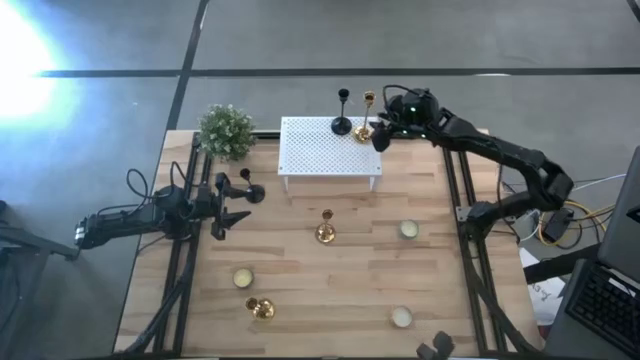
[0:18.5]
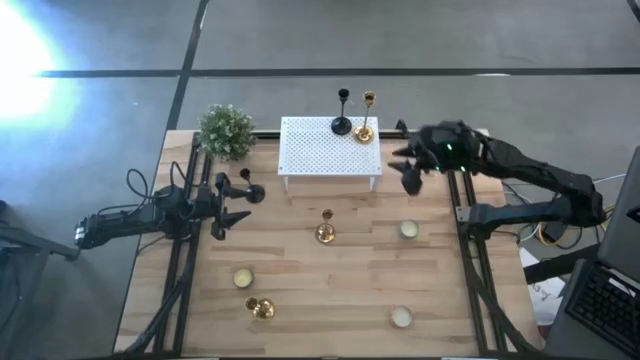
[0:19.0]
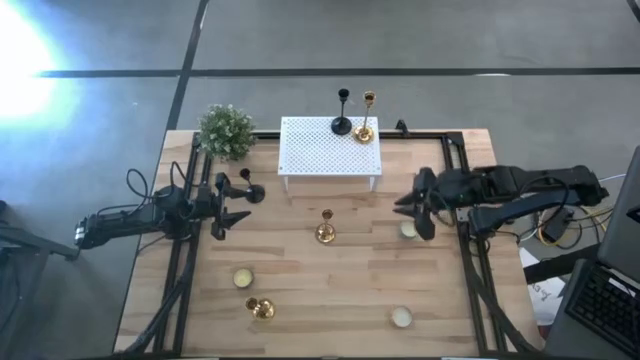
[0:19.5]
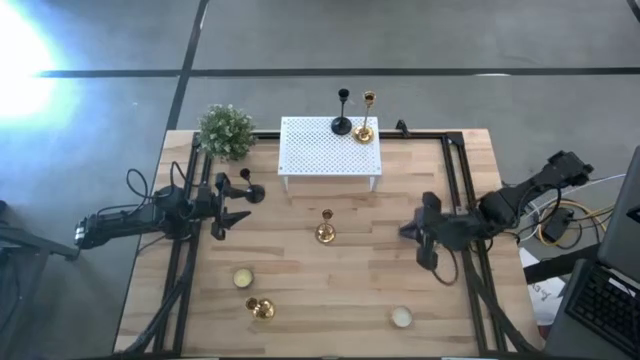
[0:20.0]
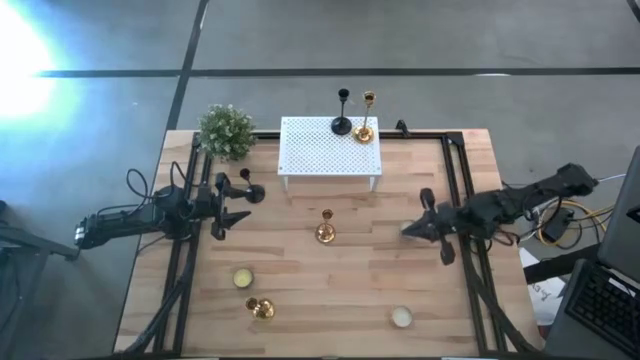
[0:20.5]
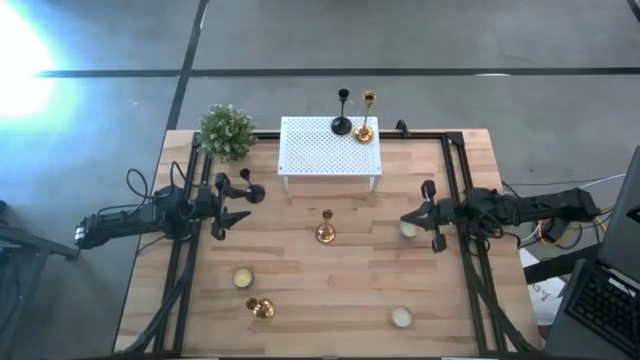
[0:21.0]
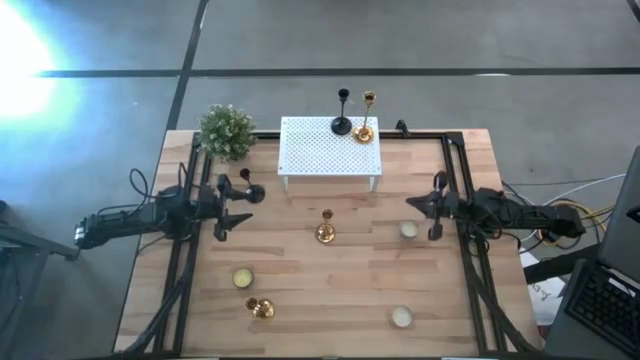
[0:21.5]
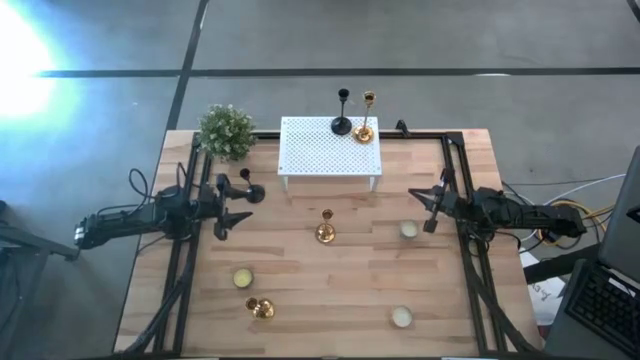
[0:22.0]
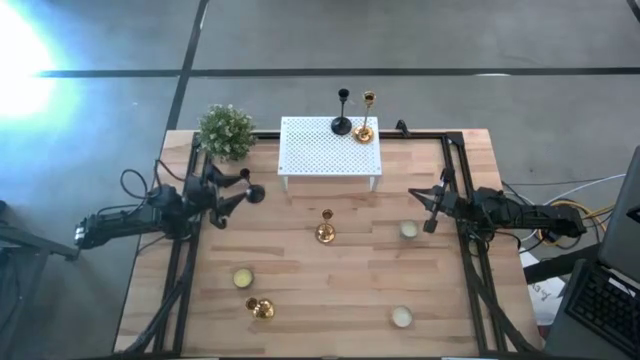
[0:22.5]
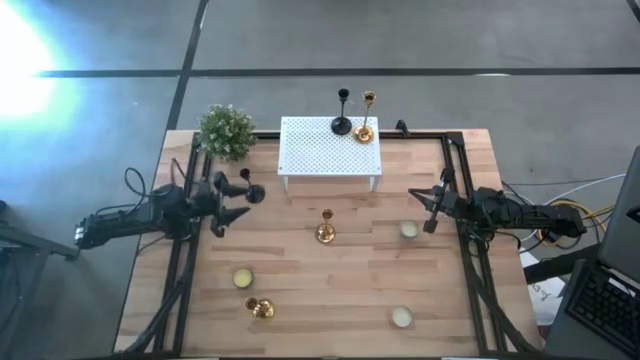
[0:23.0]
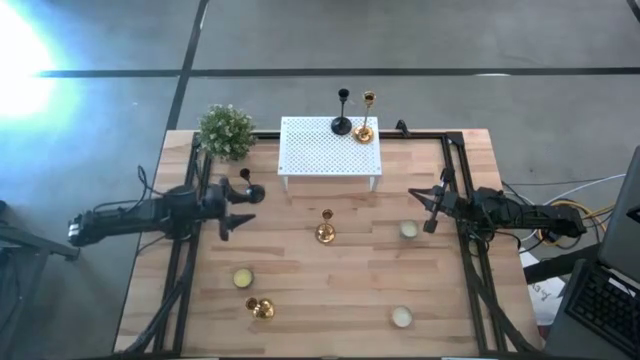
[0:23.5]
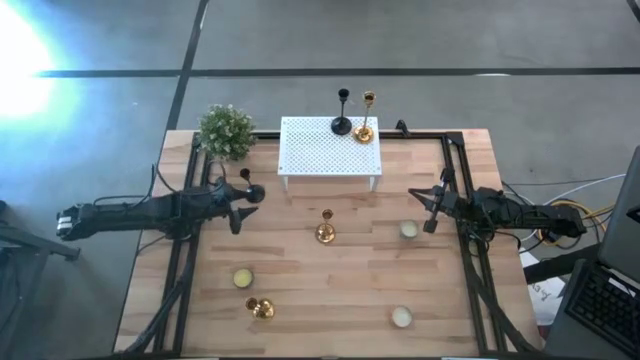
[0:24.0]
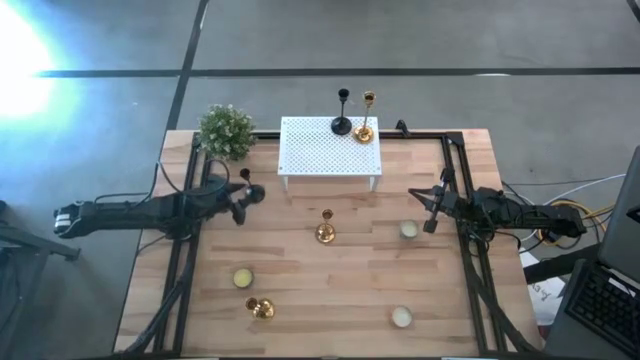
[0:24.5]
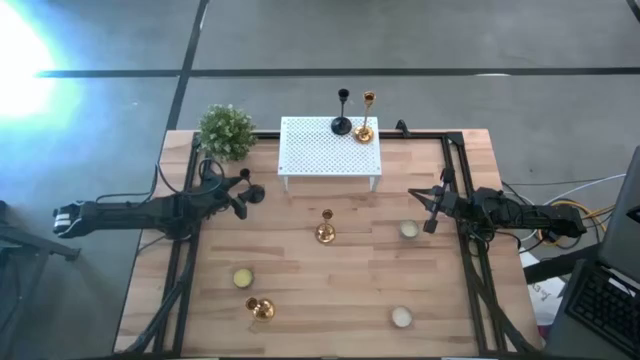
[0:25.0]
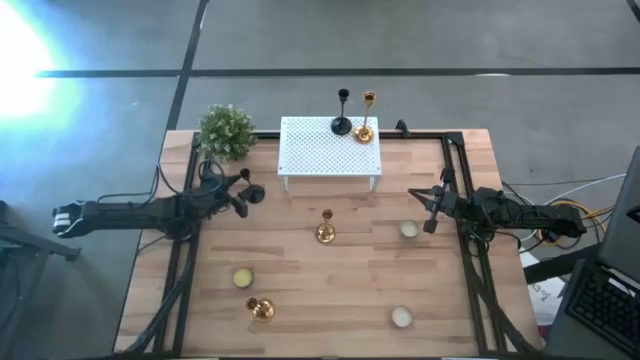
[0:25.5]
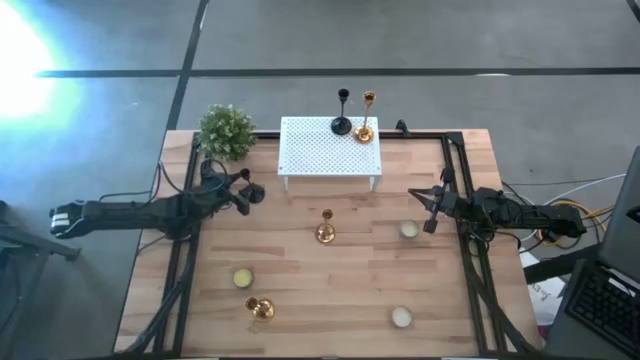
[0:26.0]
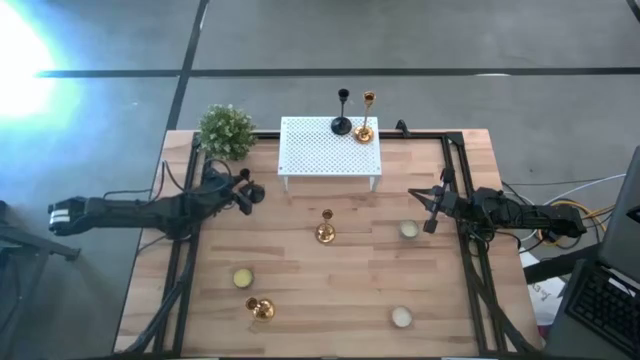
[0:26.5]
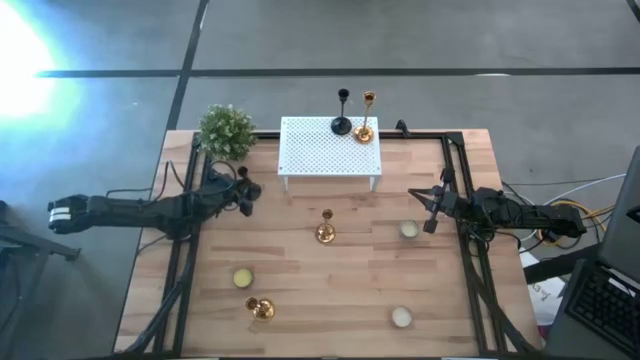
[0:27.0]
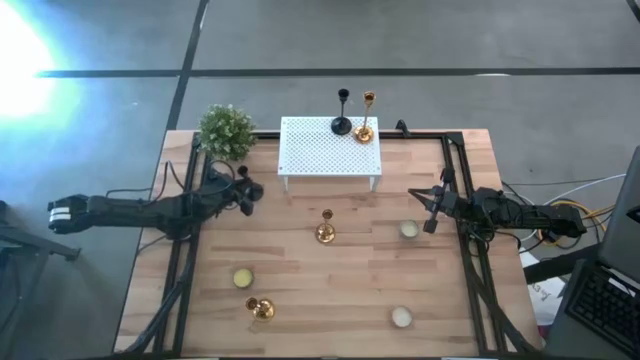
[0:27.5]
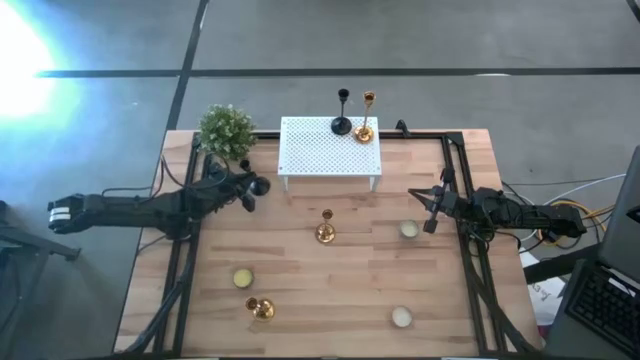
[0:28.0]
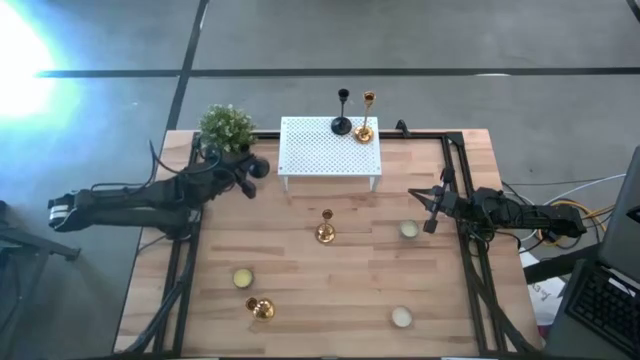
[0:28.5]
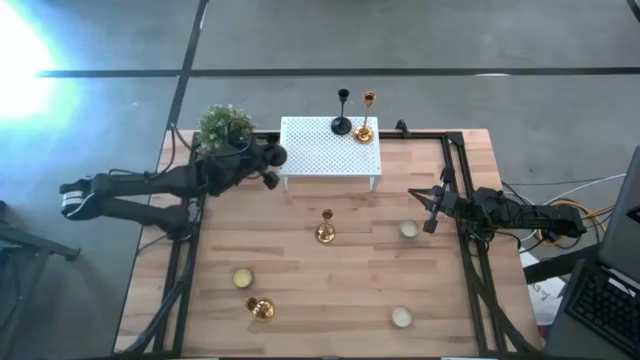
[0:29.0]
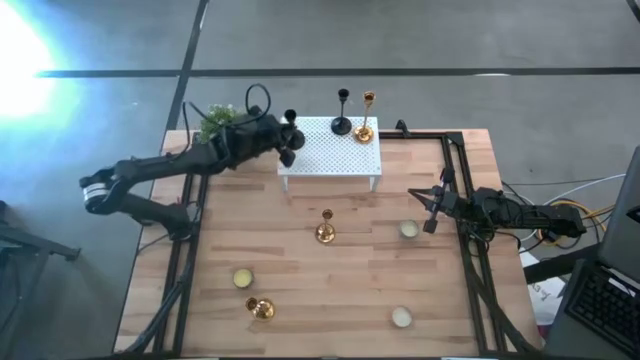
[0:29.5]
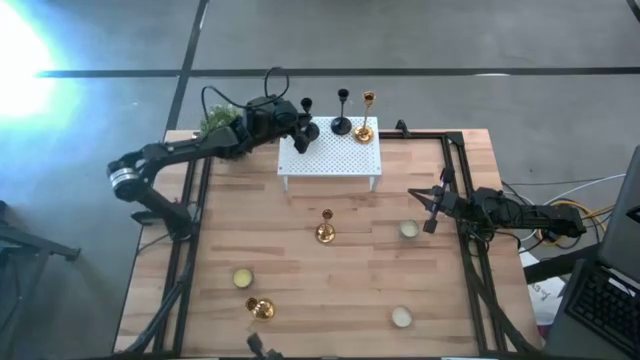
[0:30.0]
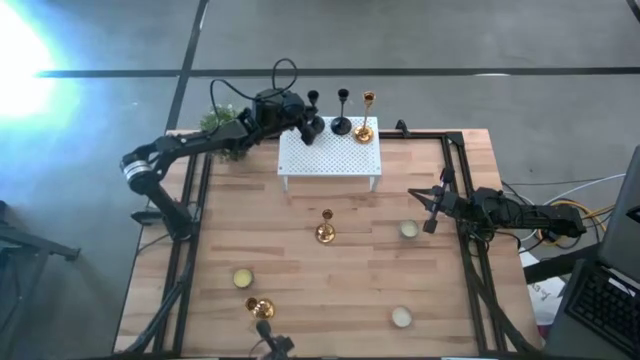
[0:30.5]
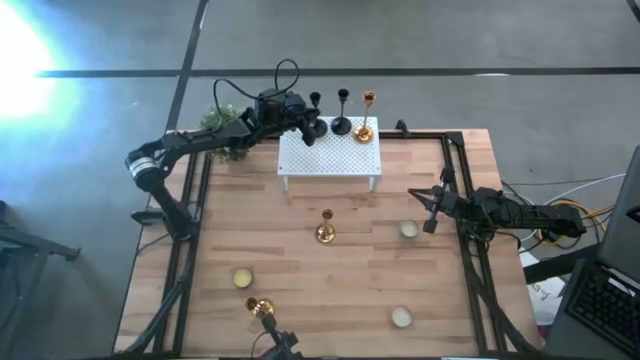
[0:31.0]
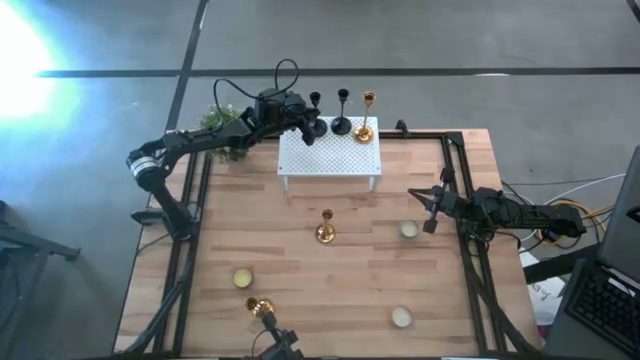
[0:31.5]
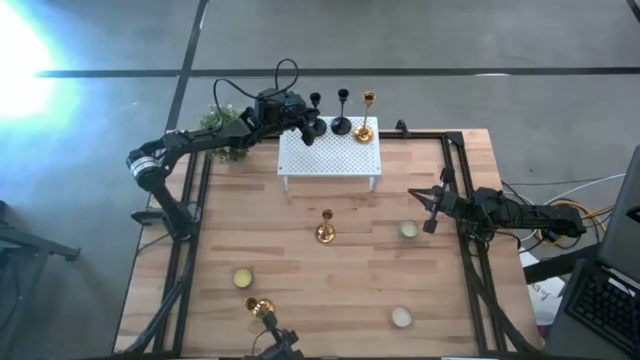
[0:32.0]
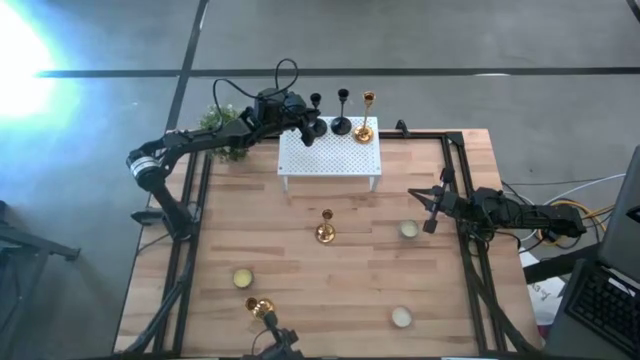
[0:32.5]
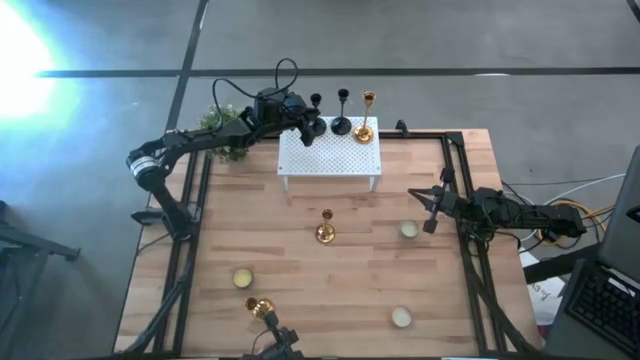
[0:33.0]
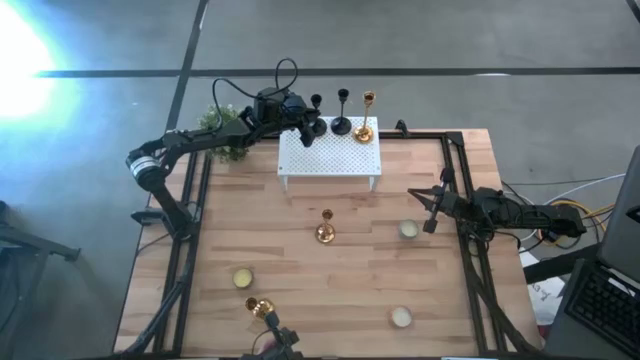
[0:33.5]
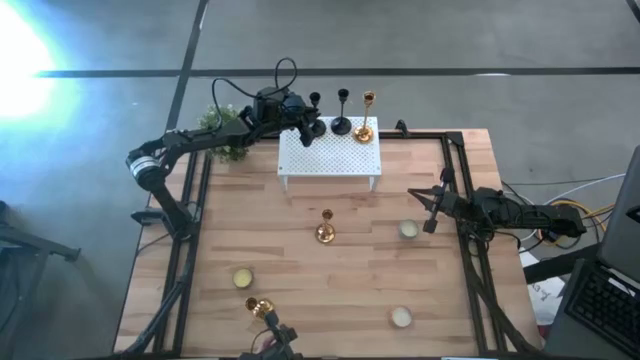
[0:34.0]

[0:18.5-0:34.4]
Task: Pick & Place candle stick holders
Put the black candle holder on the shelf

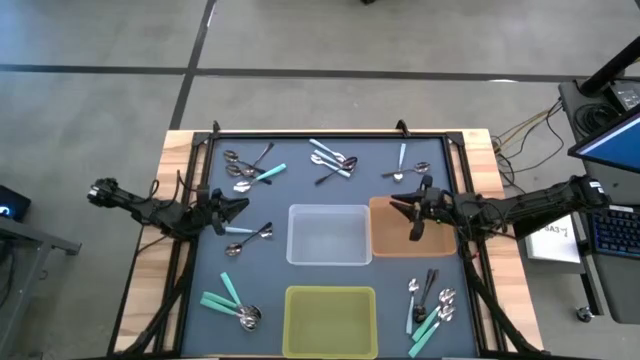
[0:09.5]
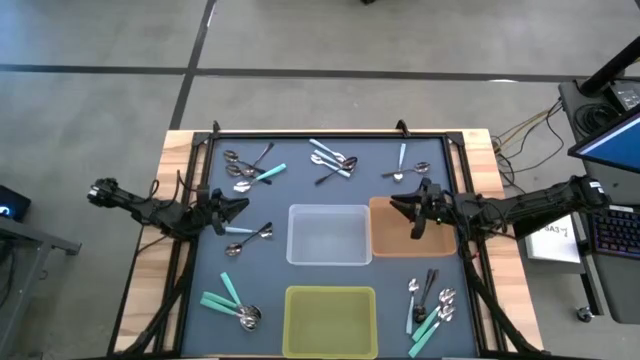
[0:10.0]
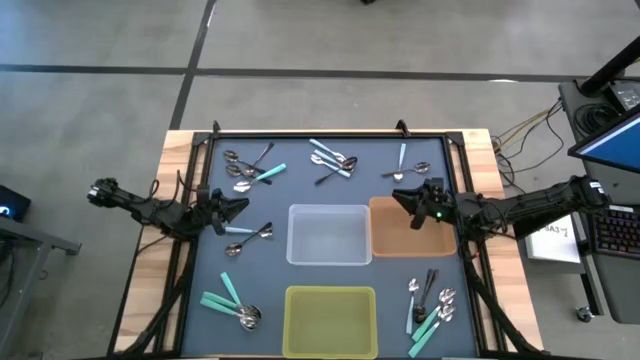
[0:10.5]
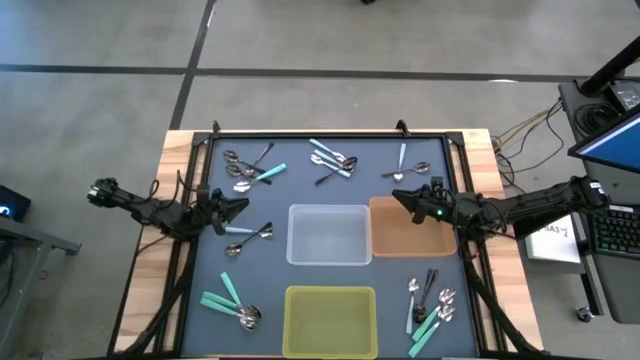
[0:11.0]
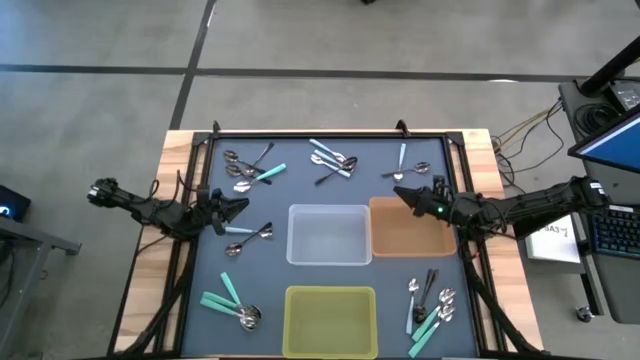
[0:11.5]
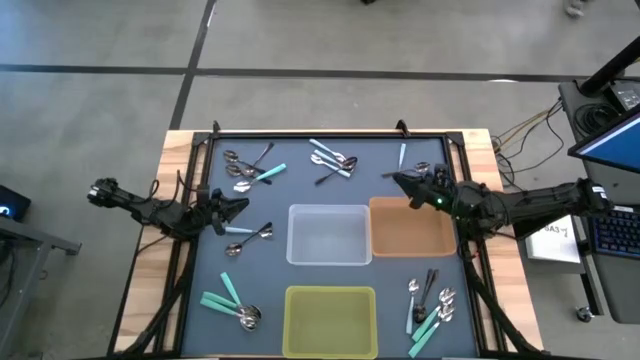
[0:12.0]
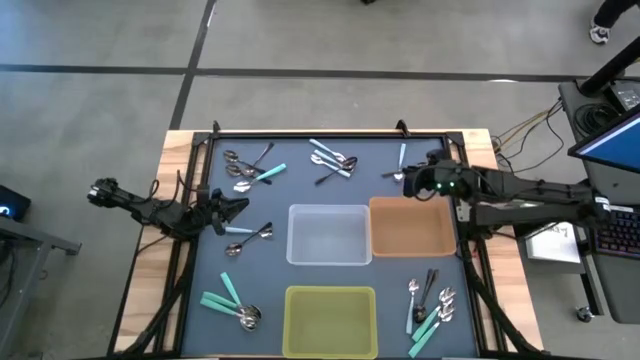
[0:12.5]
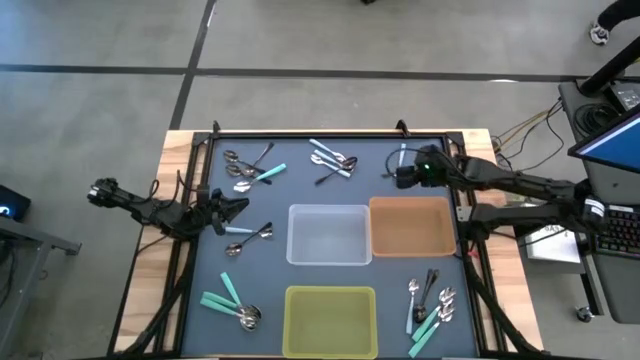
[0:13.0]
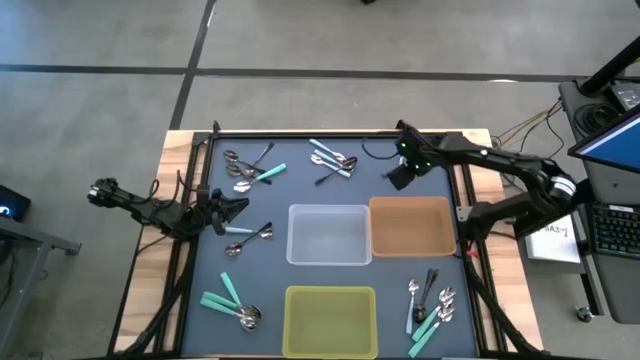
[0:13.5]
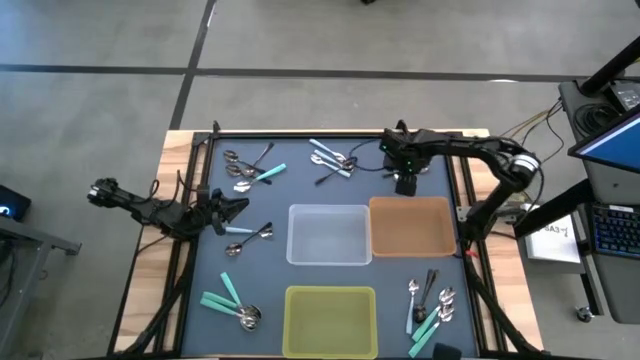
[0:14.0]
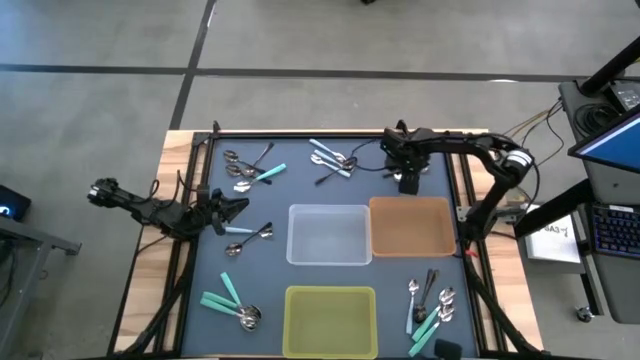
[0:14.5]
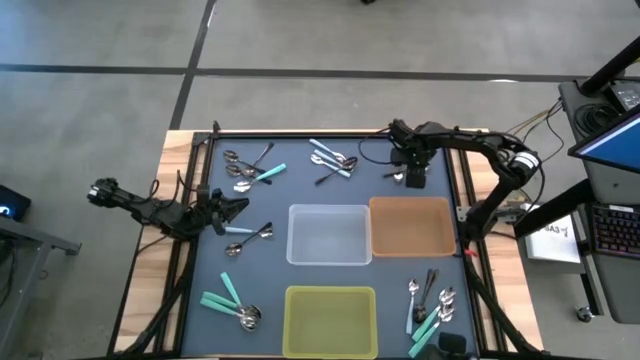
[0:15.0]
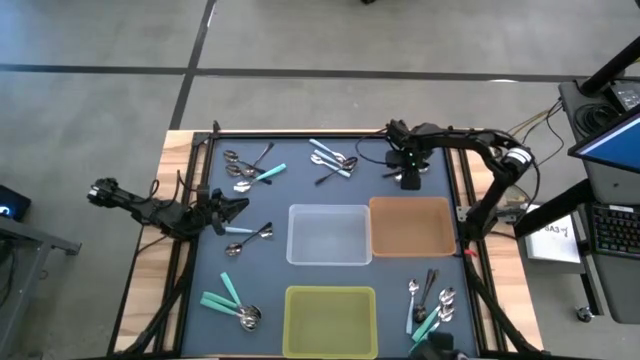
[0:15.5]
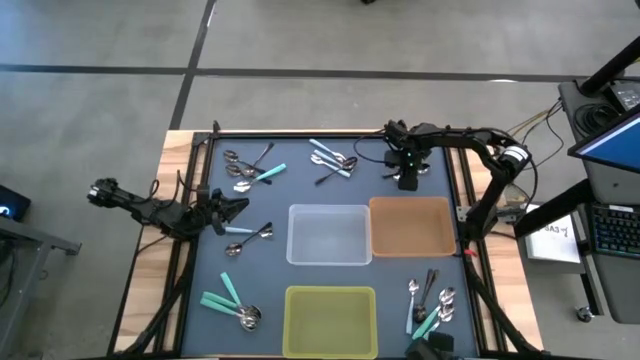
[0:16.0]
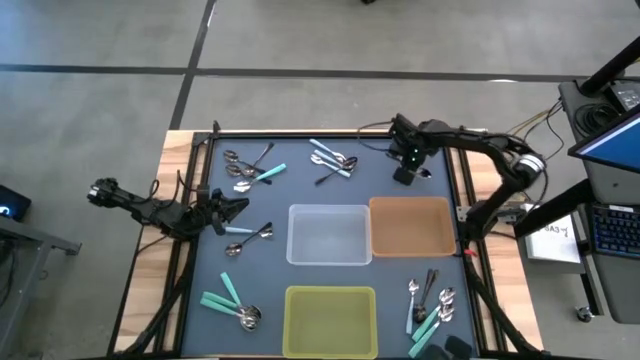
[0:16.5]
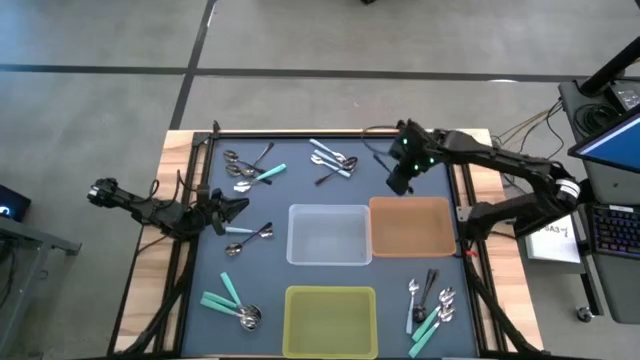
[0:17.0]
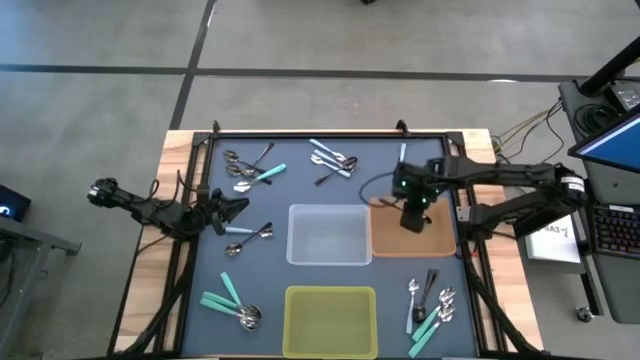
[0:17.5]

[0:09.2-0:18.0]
Task: Sort silverware by color (type)
Put the black spoon into the orange bin
